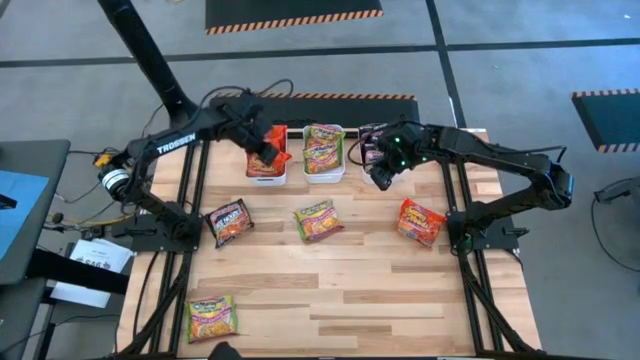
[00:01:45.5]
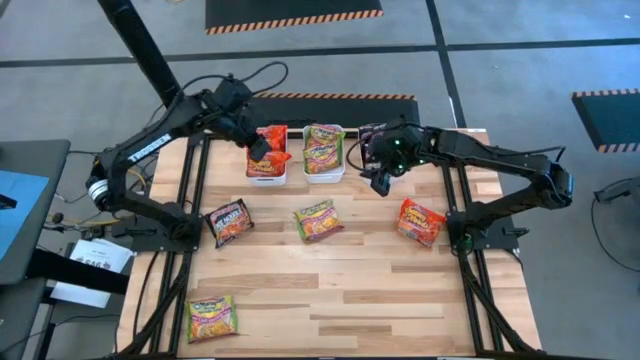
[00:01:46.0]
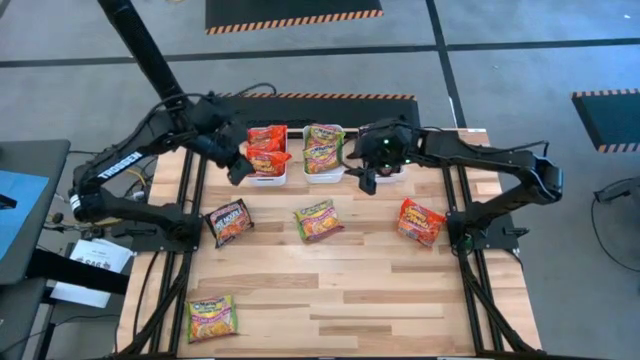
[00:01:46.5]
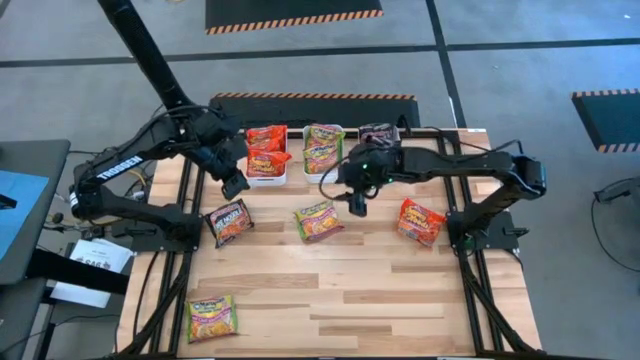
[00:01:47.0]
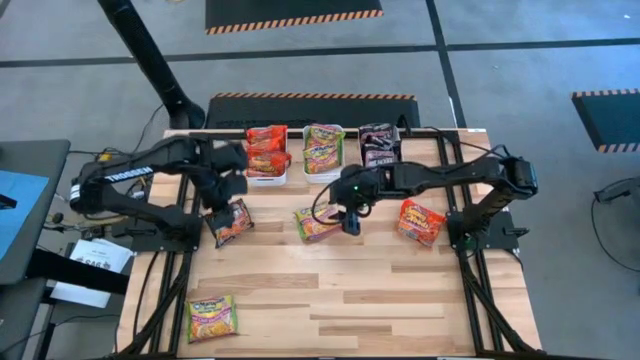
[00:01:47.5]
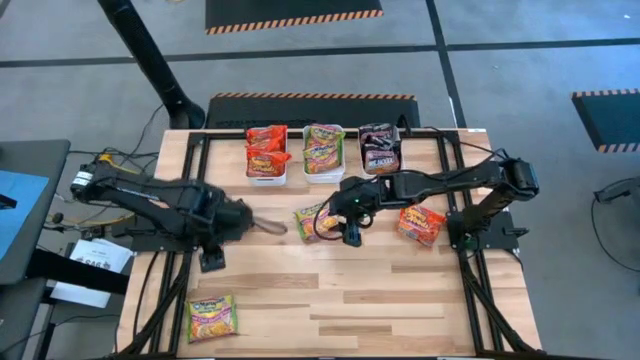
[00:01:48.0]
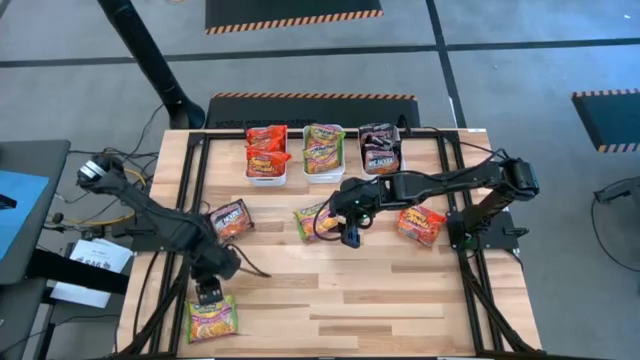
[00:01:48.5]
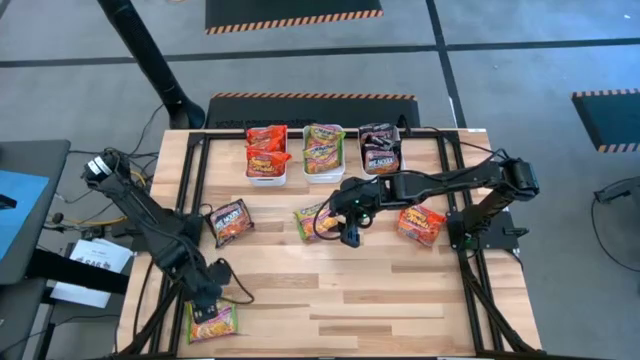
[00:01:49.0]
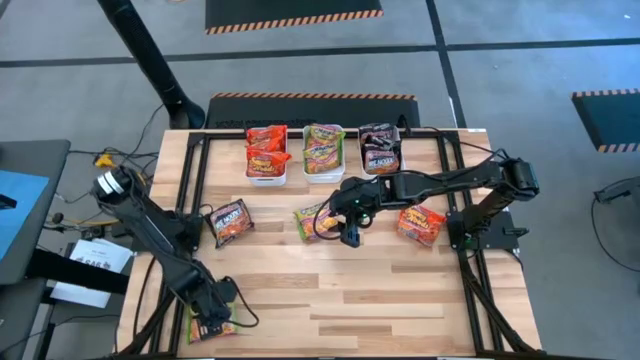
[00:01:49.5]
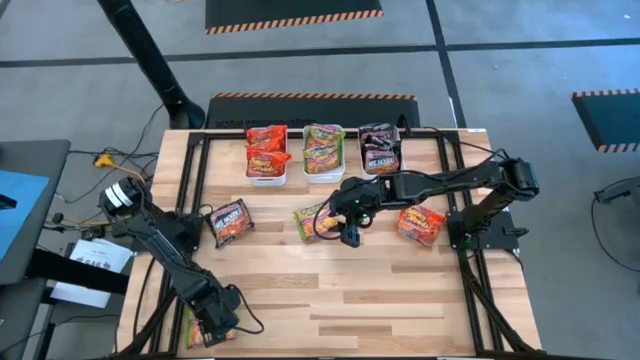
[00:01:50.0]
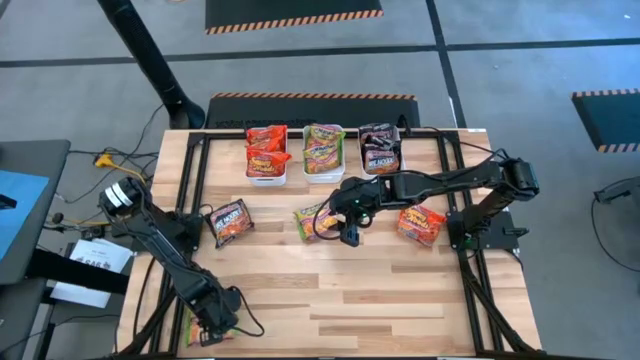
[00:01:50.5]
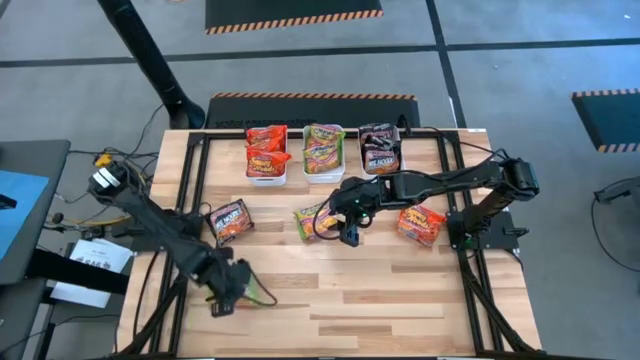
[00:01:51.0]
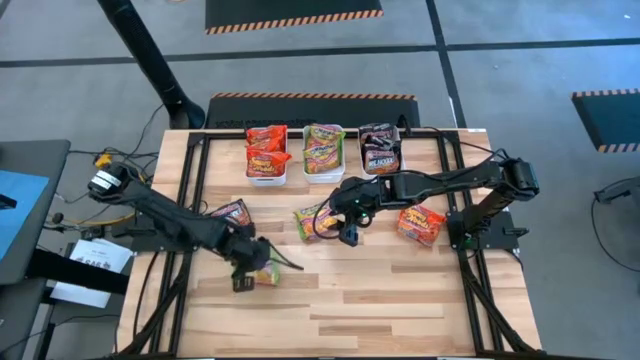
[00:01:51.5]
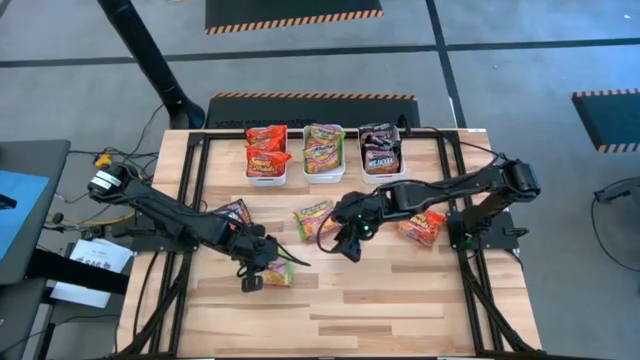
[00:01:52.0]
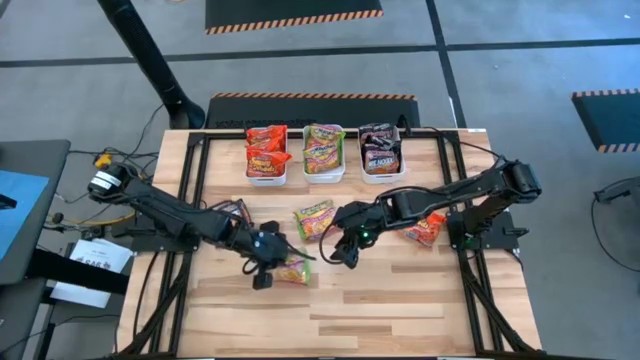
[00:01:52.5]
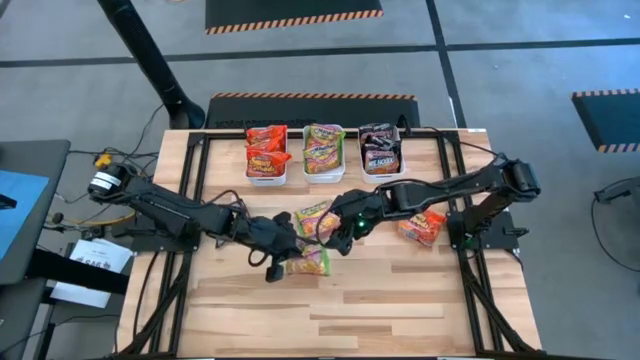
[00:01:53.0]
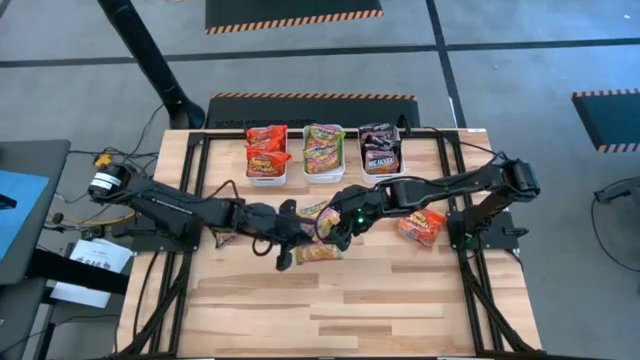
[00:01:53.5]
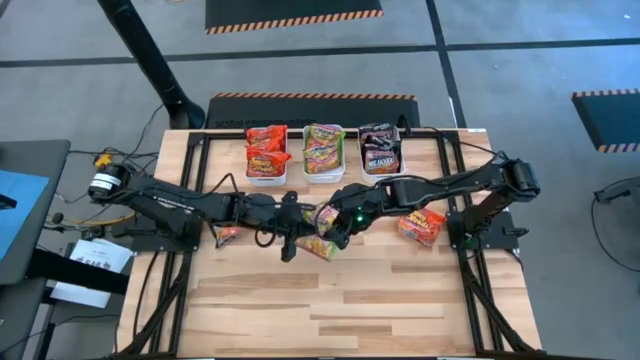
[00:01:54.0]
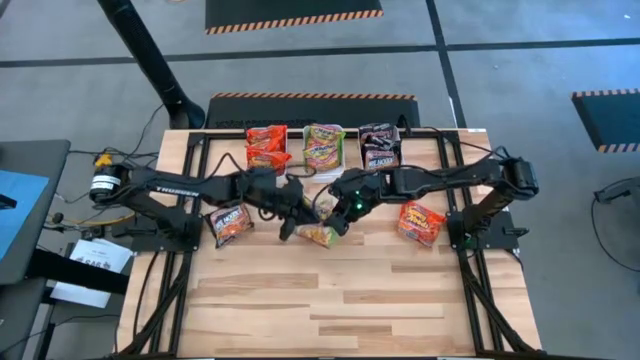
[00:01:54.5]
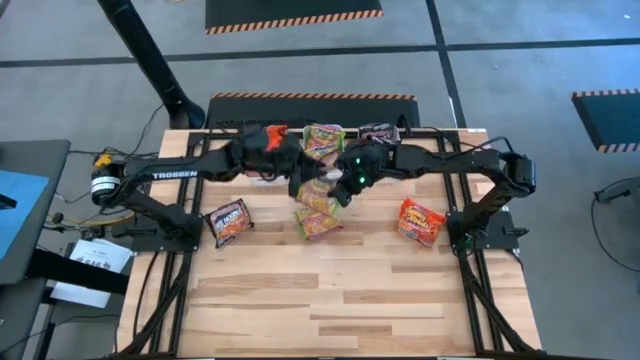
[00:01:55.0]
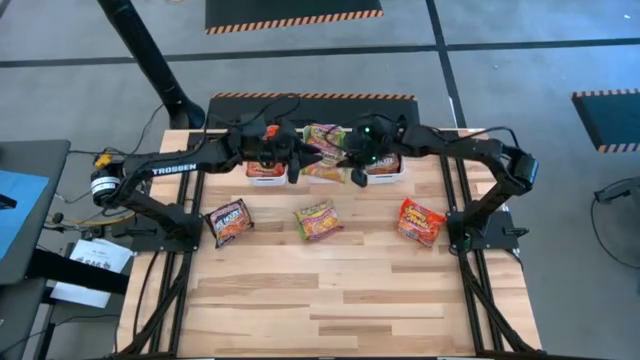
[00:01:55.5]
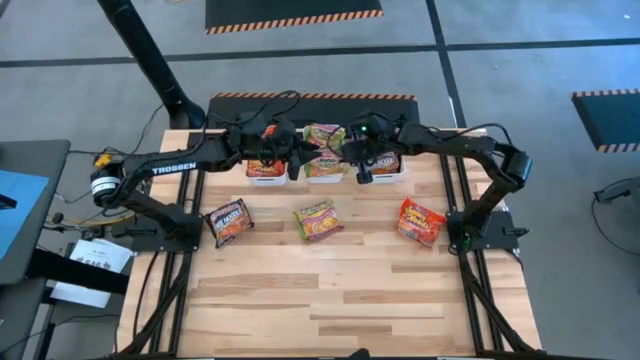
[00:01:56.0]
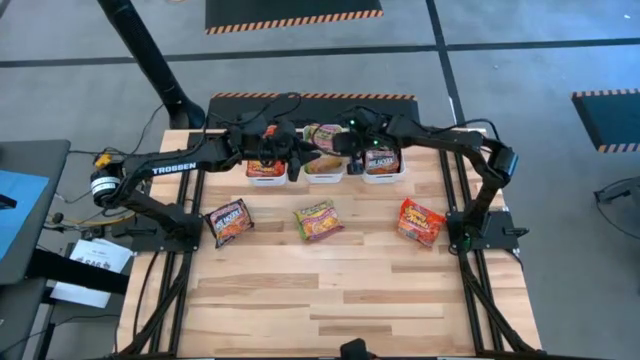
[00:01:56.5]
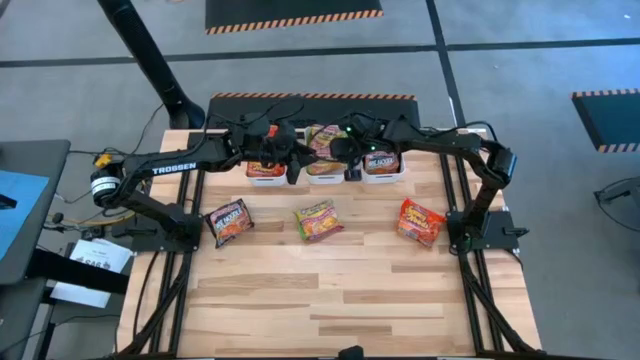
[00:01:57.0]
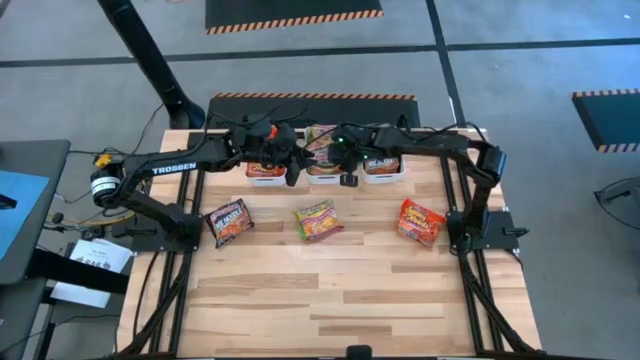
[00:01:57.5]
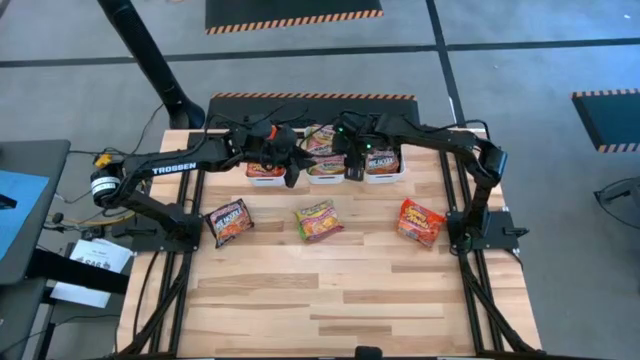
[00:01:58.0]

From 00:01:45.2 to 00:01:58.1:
Task: Sort Maruchan noodles
Put the bottom green noodle pack into the middle white bin
